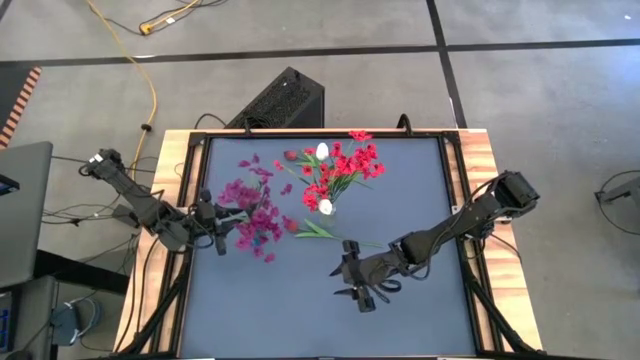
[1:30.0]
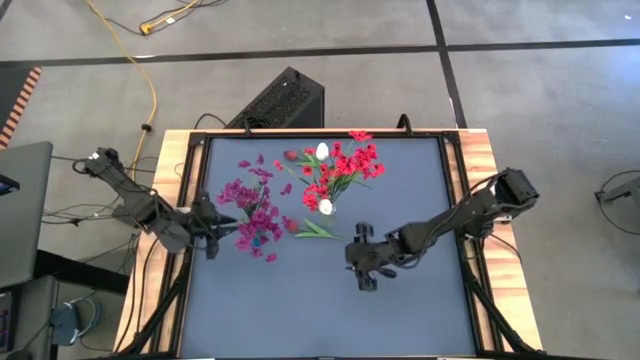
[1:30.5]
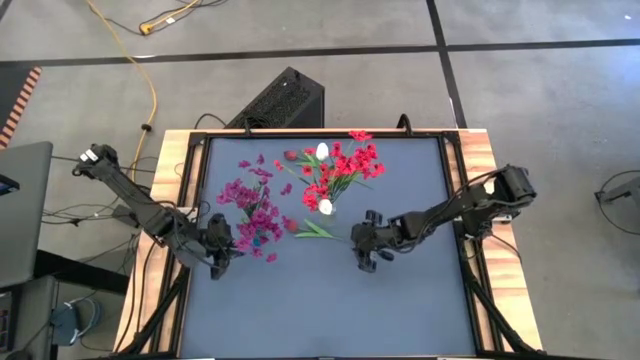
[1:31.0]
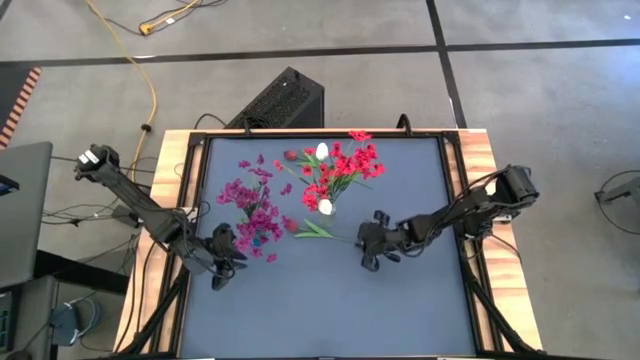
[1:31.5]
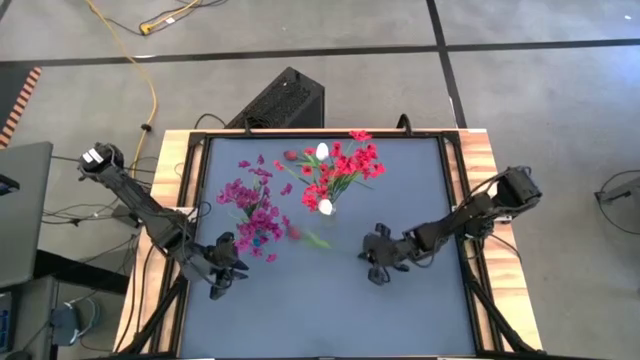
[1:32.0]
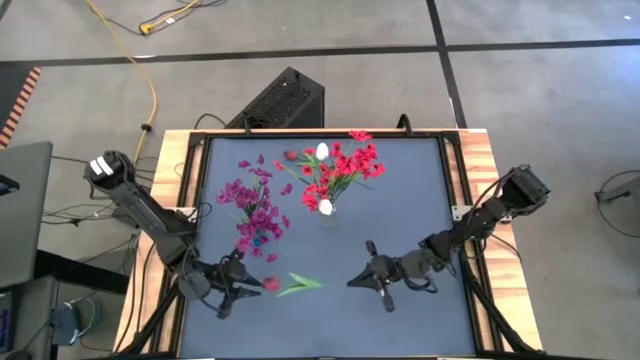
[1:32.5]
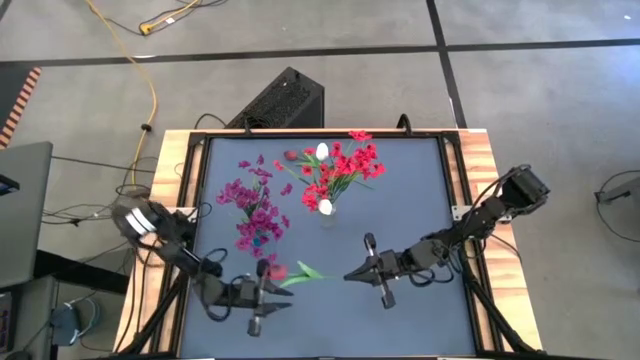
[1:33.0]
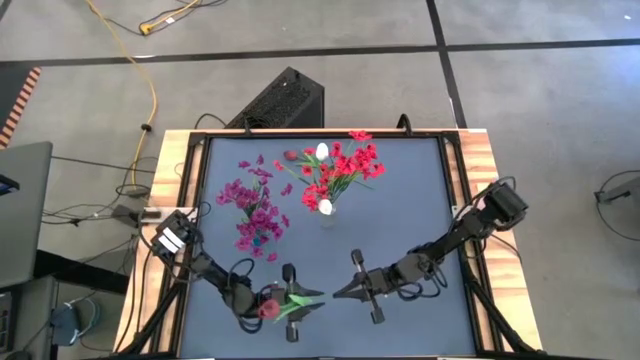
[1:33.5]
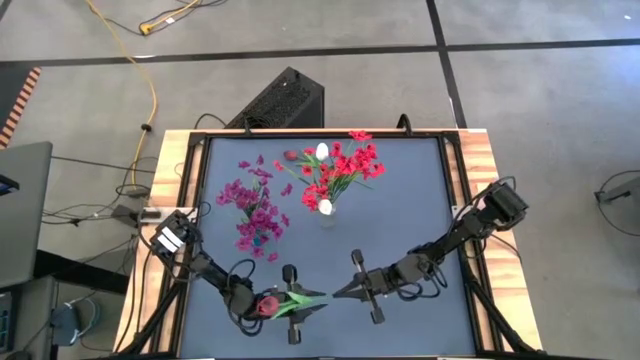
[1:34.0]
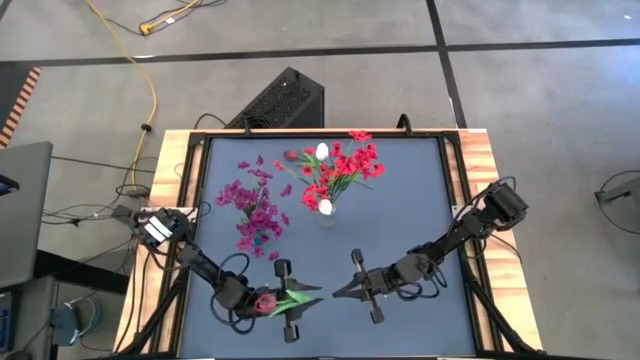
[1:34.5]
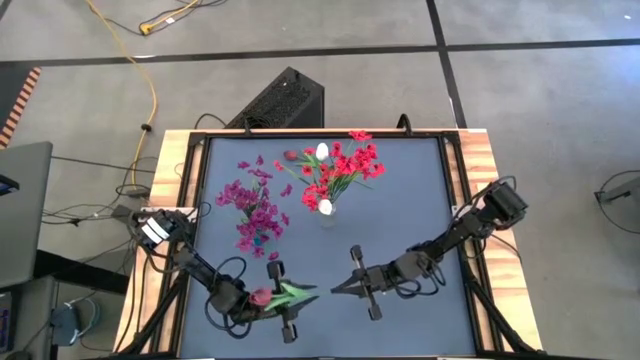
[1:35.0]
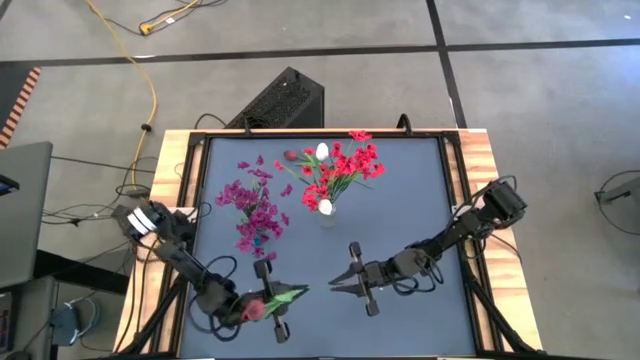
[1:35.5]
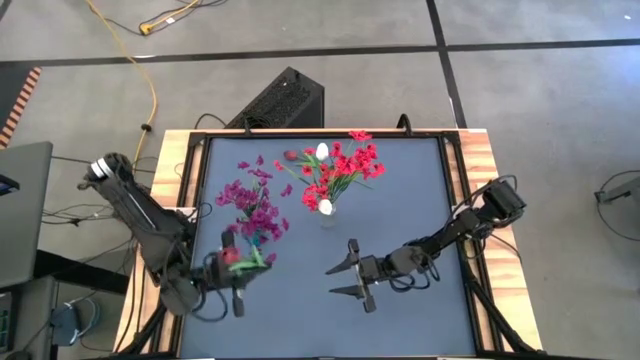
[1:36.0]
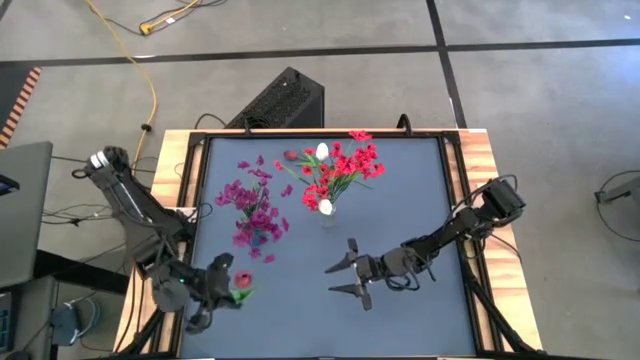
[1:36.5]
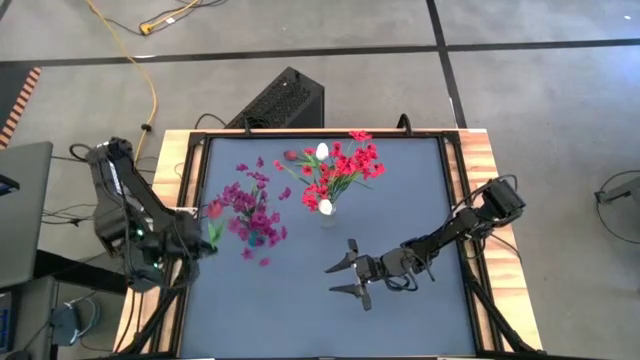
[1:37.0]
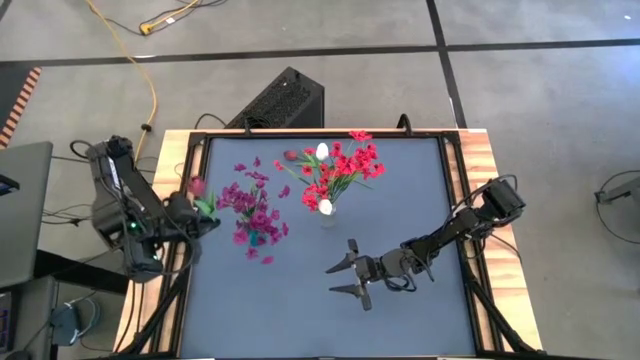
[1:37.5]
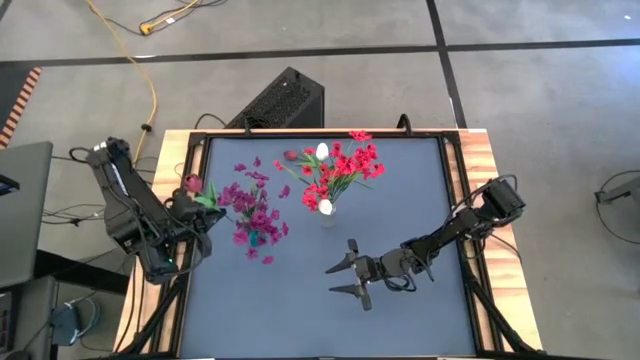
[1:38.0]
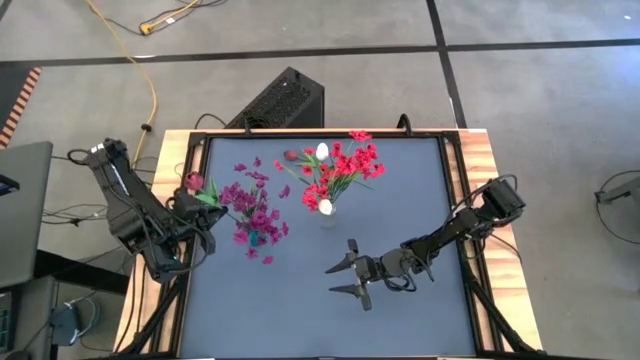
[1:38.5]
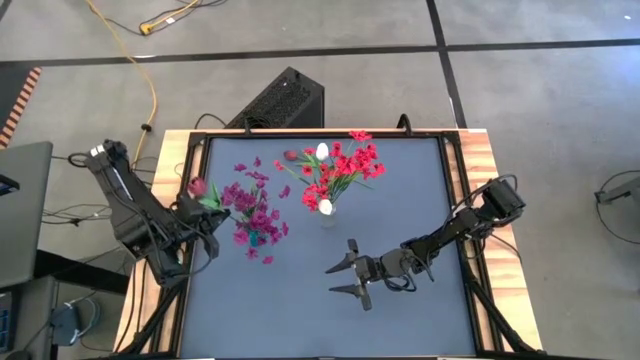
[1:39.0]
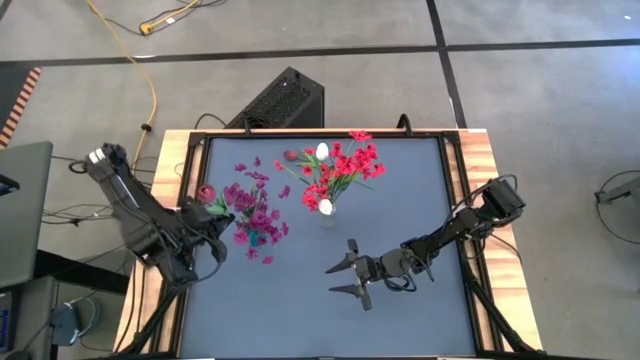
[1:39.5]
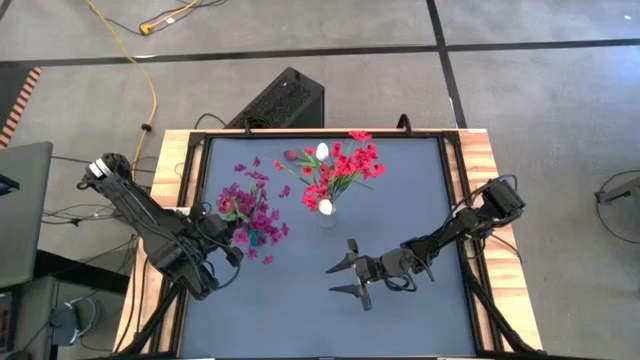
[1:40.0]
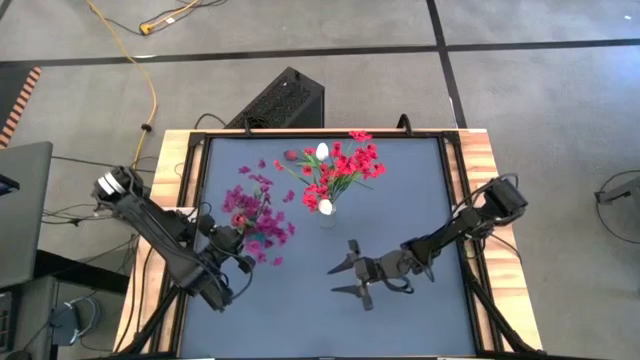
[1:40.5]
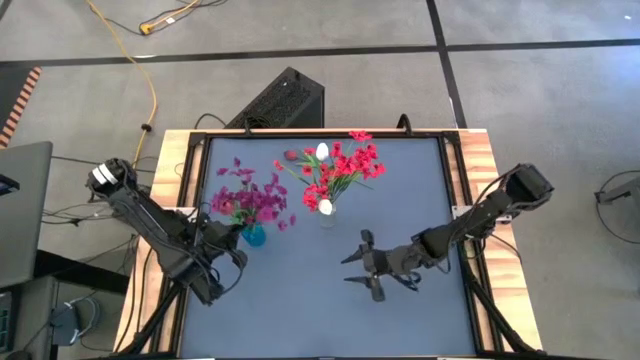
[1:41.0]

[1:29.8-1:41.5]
Task: Sort flowers into vase by color
Put the bottom red tulip into the blue vase

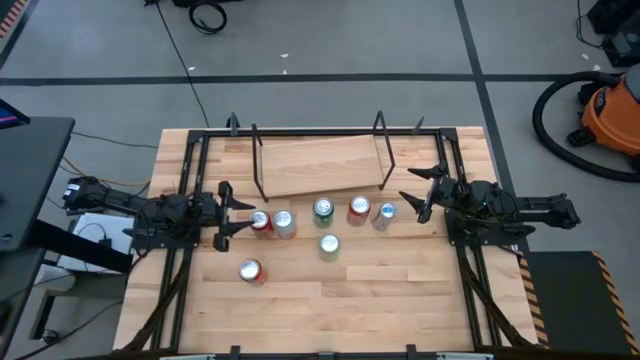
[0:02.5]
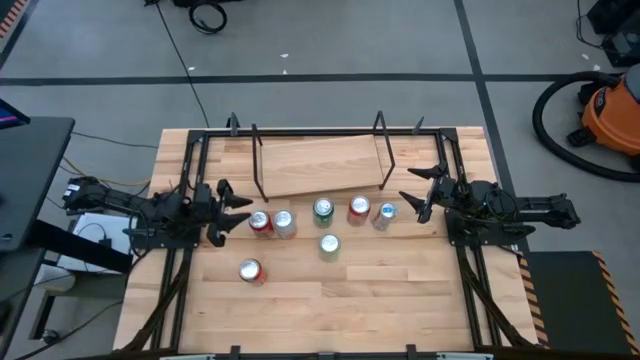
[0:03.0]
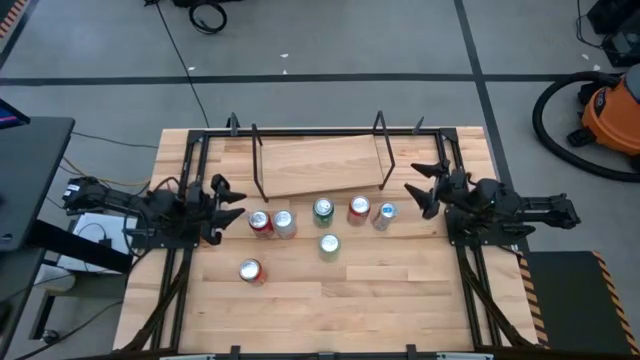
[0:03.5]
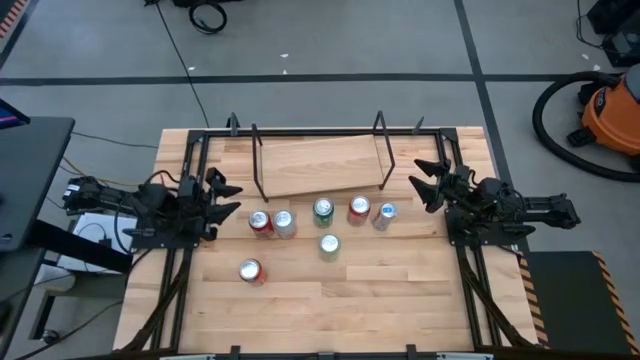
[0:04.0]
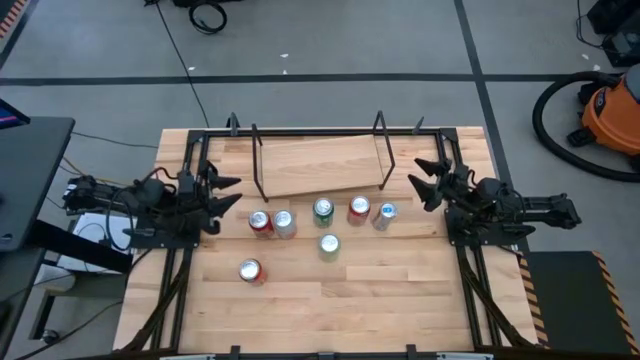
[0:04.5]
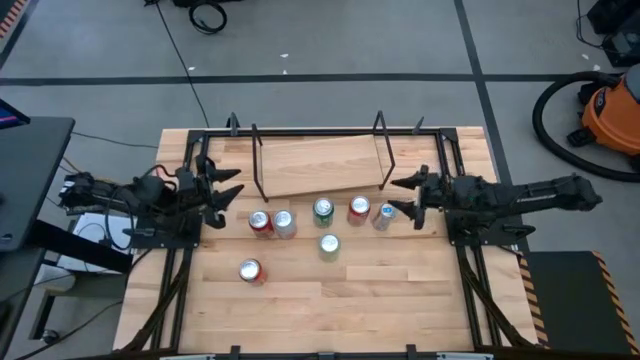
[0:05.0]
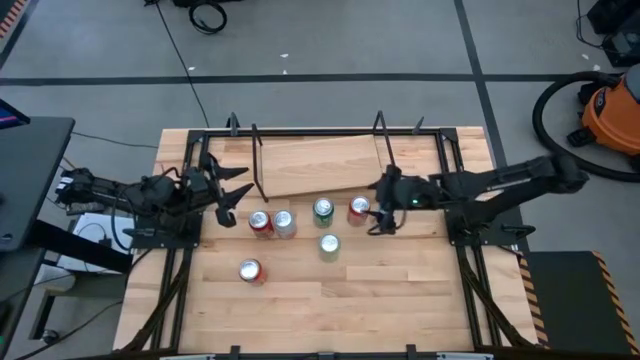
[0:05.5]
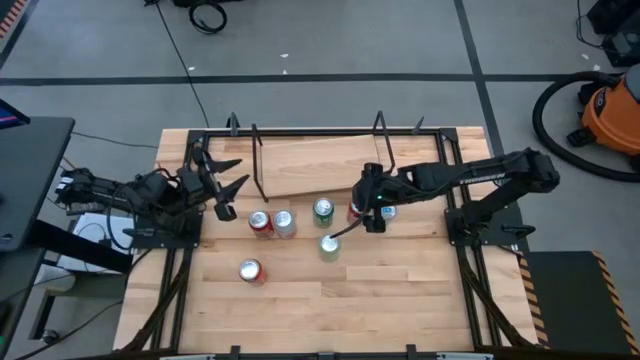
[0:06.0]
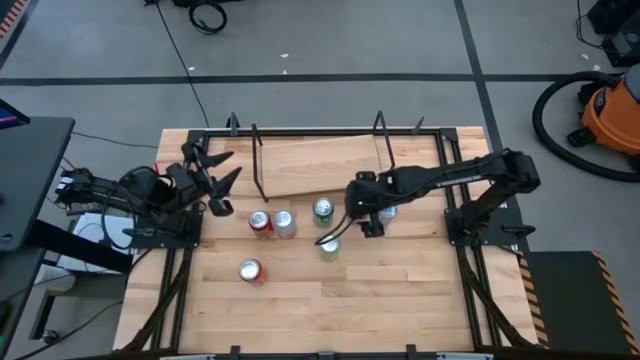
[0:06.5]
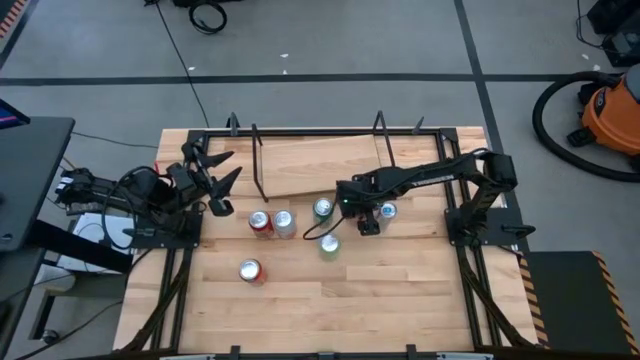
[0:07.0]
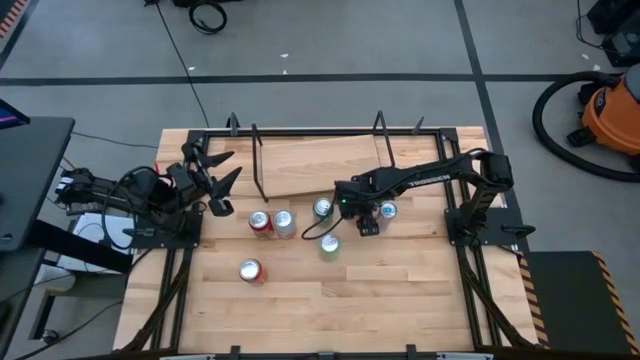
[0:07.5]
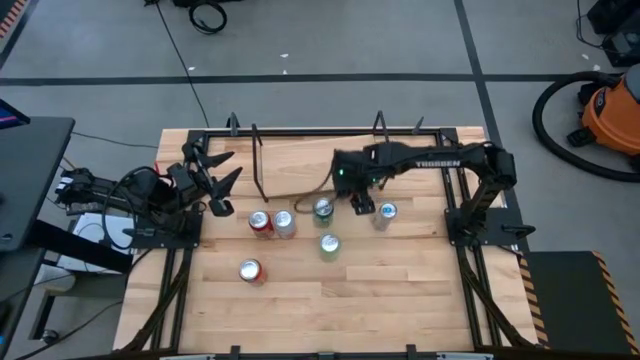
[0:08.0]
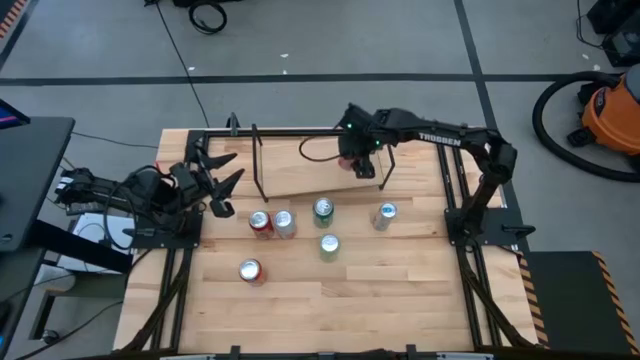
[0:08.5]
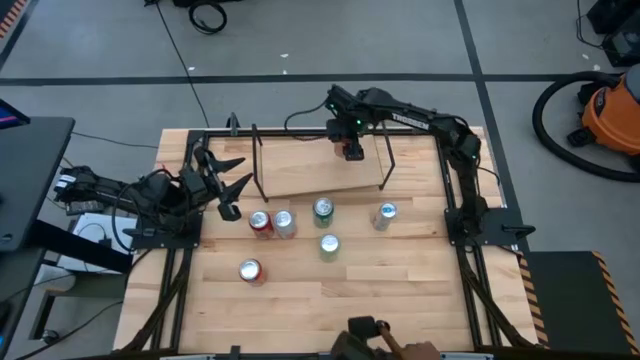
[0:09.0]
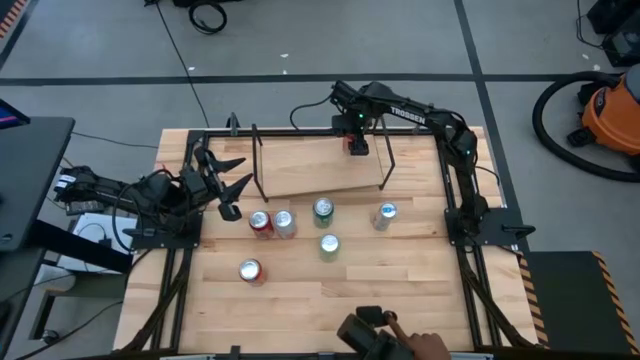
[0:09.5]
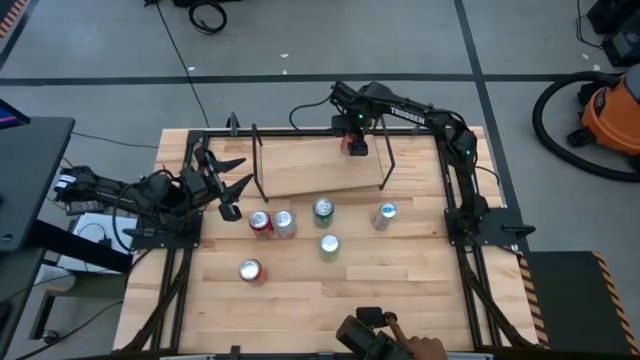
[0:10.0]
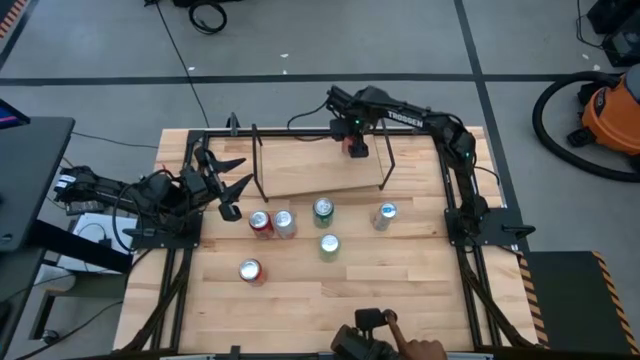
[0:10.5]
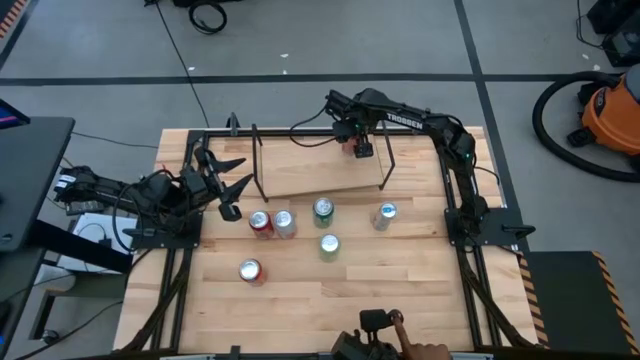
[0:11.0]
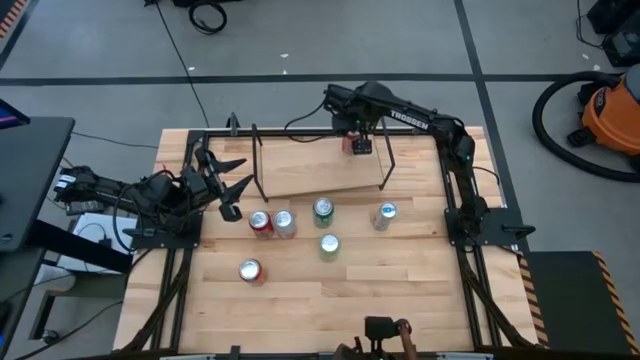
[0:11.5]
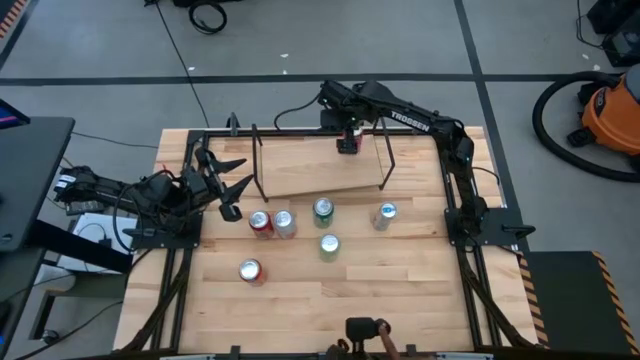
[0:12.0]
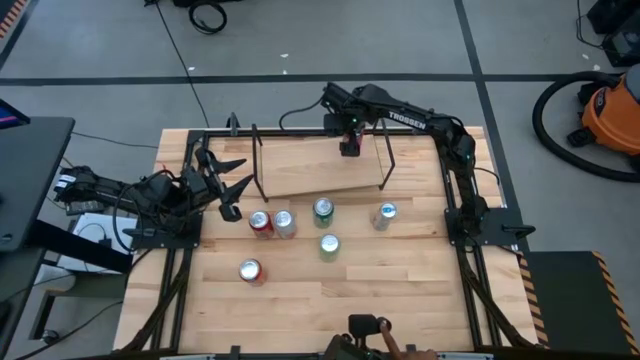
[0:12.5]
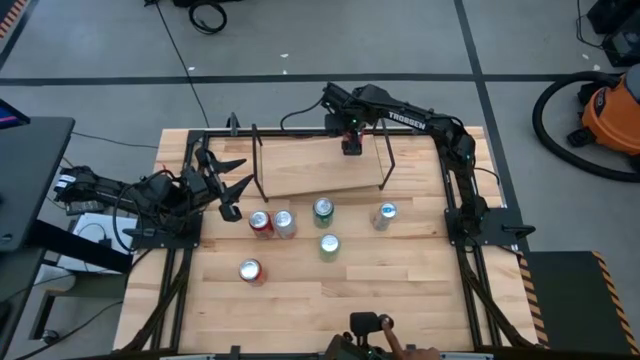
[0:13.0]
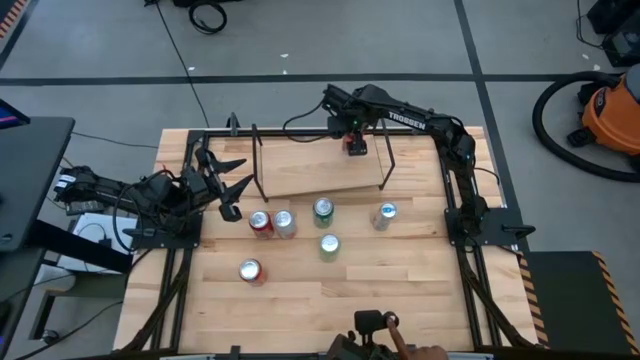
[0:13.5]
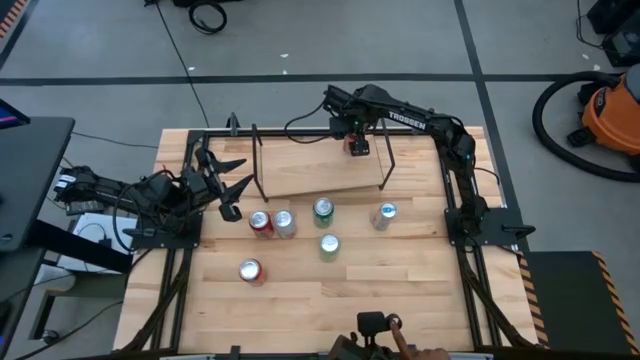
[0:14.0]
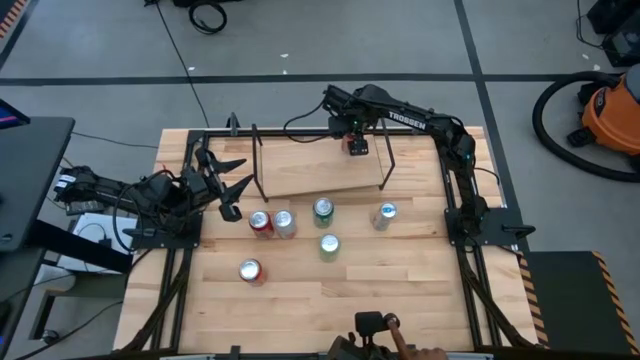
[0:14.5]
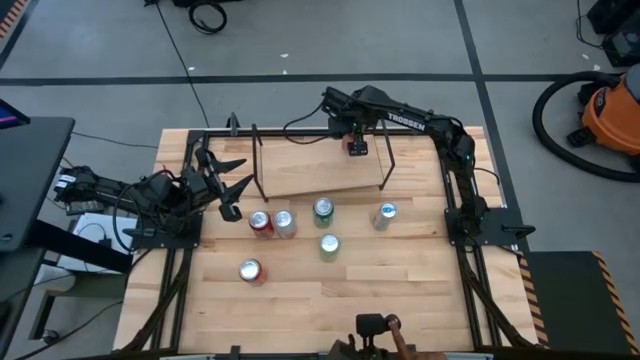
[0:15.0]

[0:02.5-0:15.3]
Task: Place canned beverage on shelf
Put the right red soda can on the shelf
